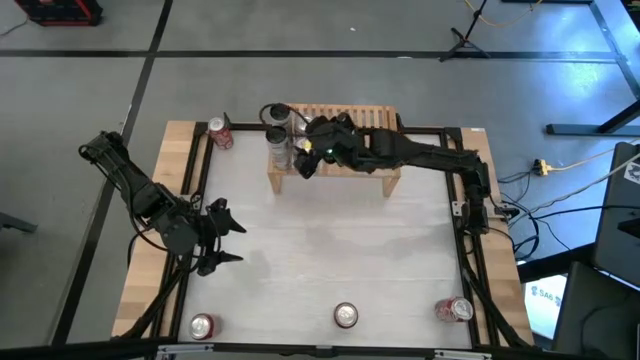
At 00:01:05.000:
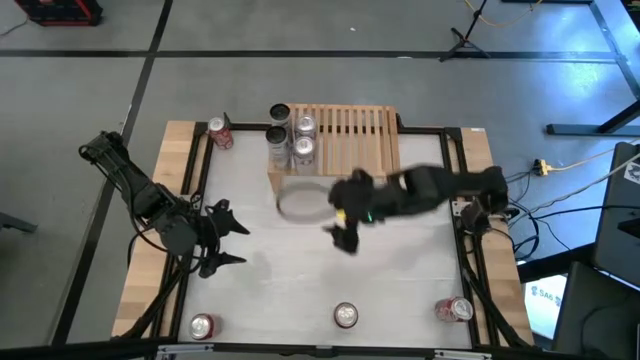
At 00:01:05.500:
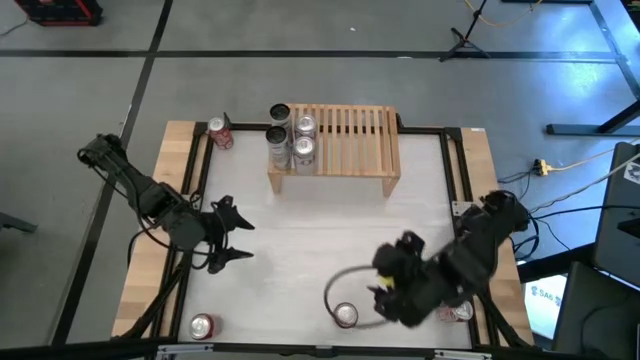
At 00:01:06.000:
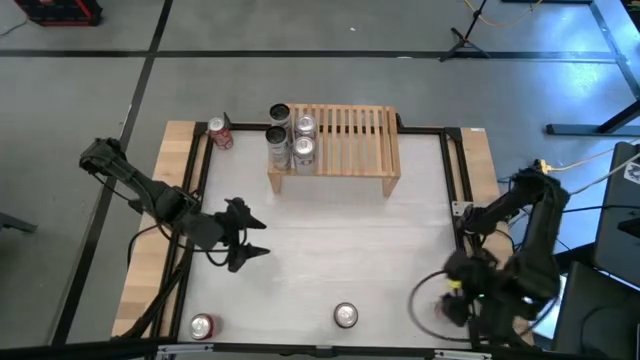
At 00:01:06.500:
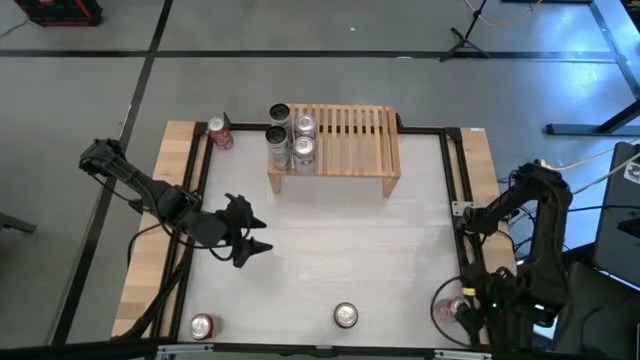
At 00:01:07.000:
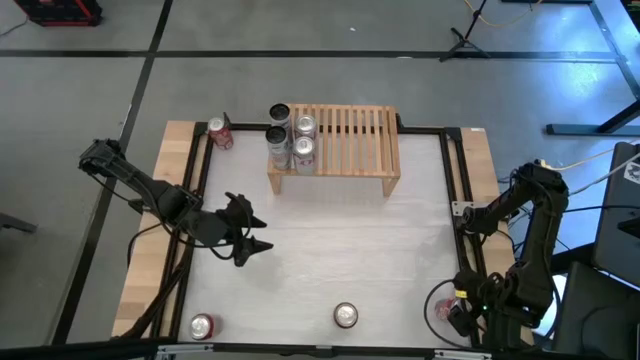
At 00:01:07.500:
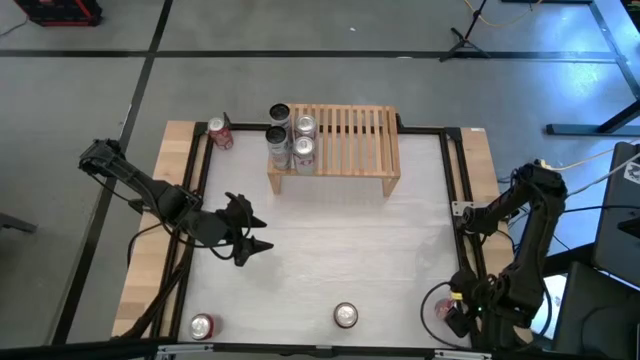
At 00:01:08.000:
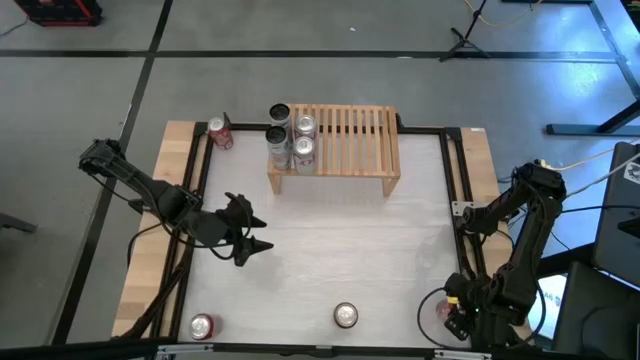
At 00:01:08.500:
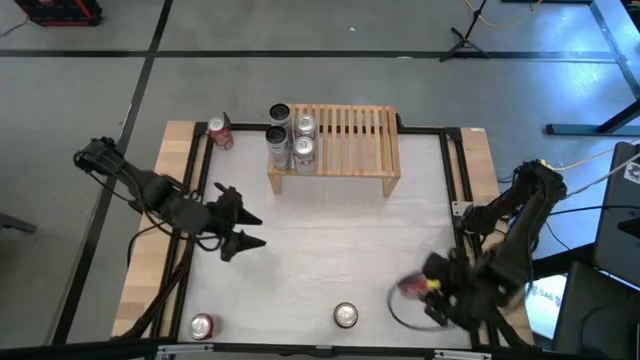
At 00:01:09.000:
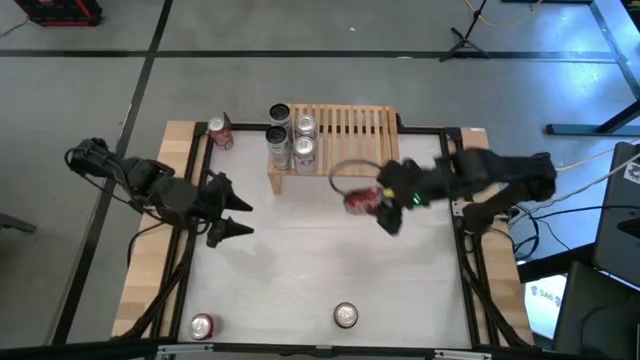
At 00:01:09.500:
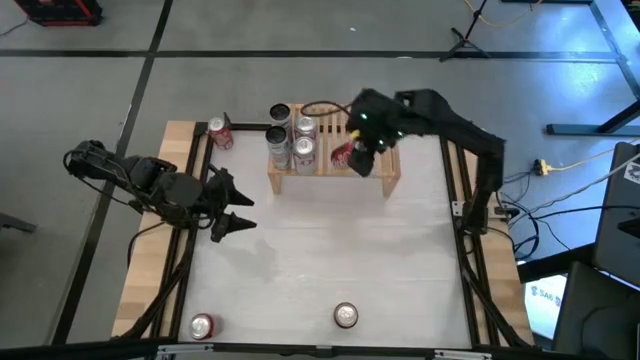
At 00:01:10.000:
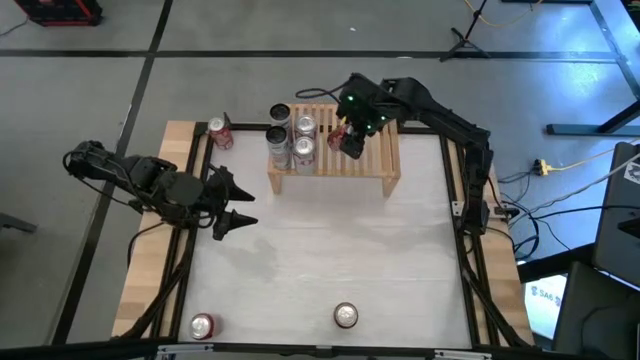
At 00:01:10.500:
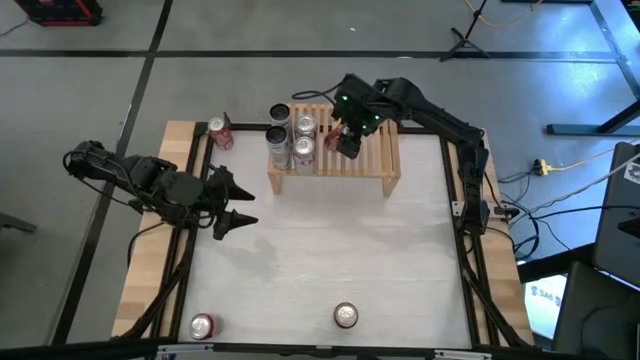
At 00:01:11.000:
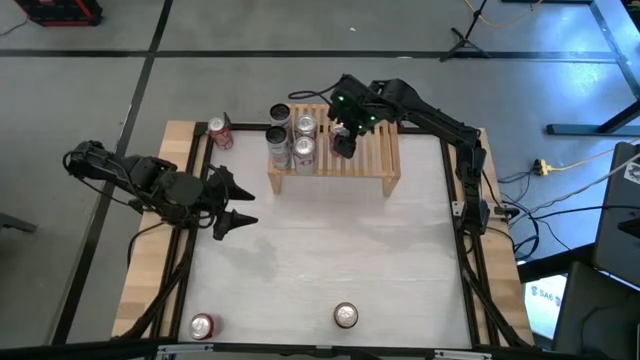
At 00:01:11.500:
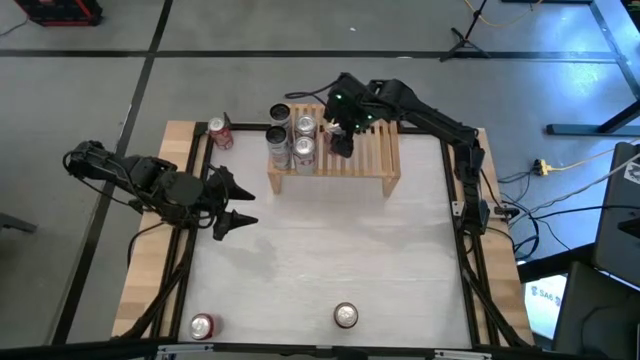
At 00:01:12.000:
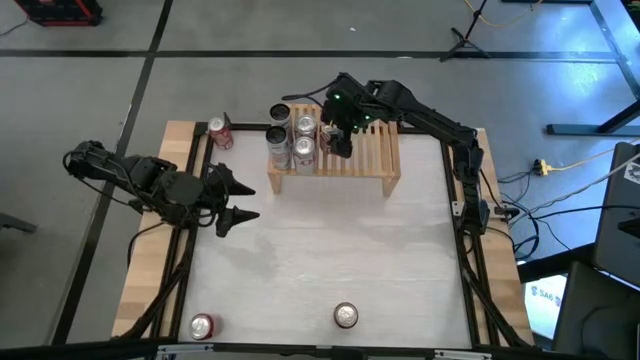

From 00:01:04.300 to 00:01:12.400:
Task: Place canned beverage on shelf
Put the red soda can on the shelf

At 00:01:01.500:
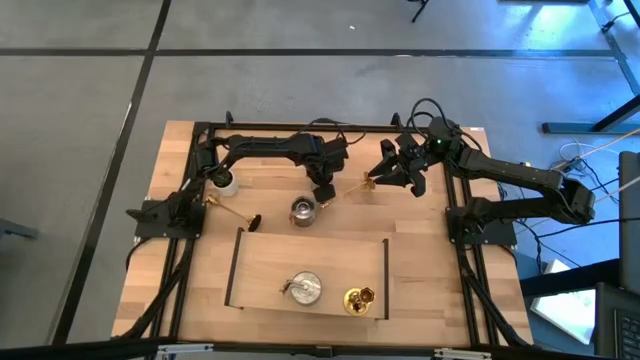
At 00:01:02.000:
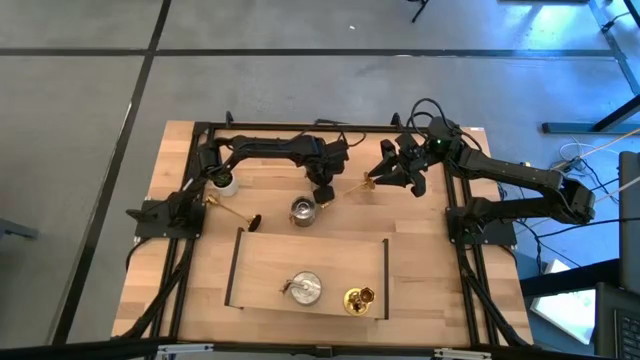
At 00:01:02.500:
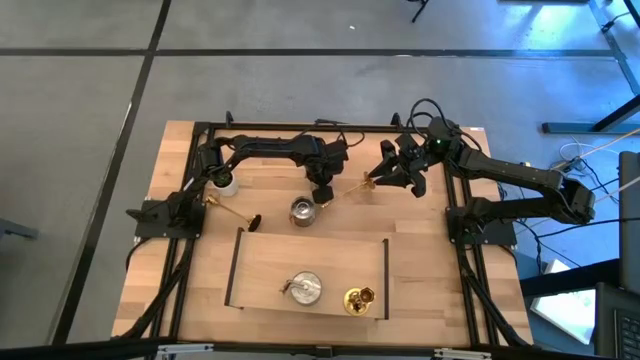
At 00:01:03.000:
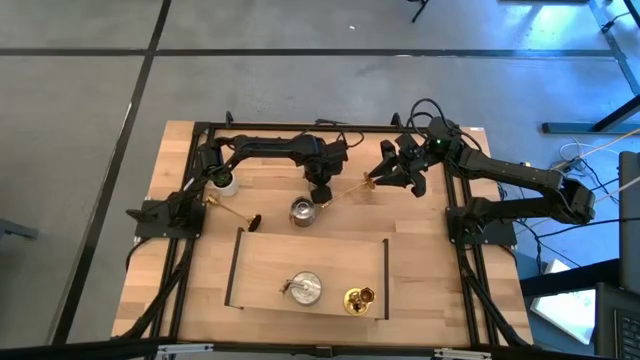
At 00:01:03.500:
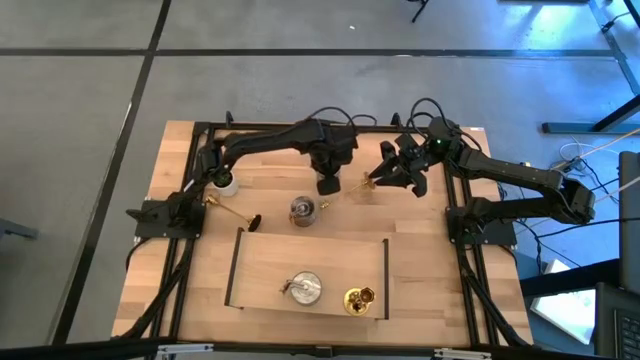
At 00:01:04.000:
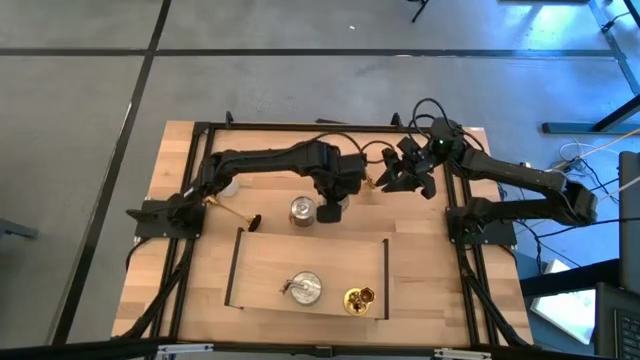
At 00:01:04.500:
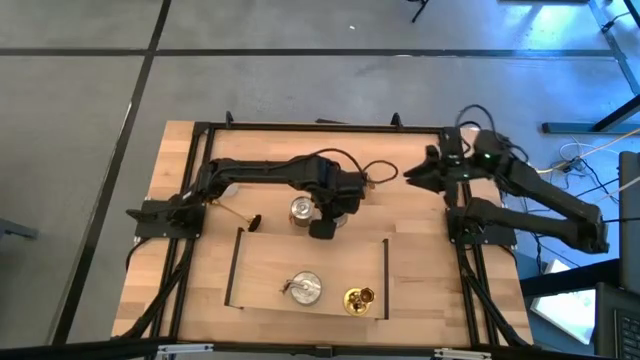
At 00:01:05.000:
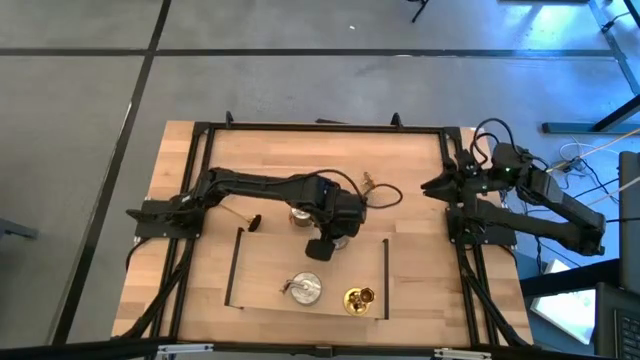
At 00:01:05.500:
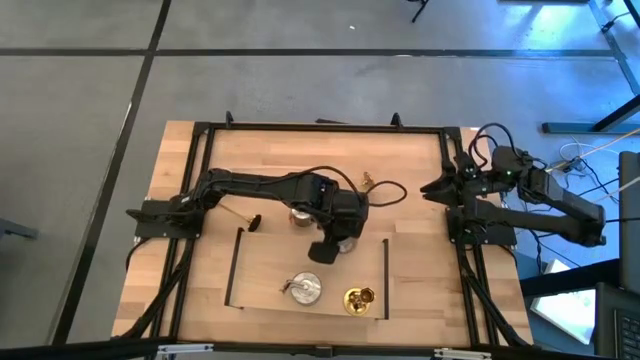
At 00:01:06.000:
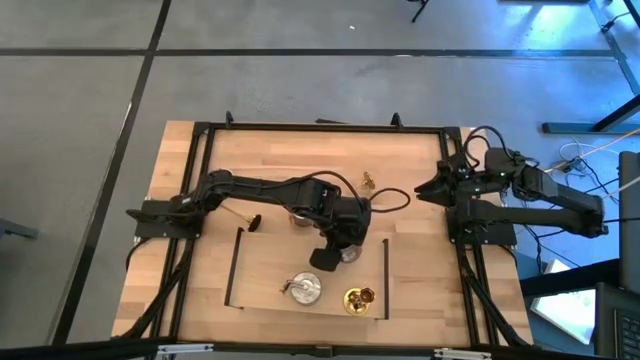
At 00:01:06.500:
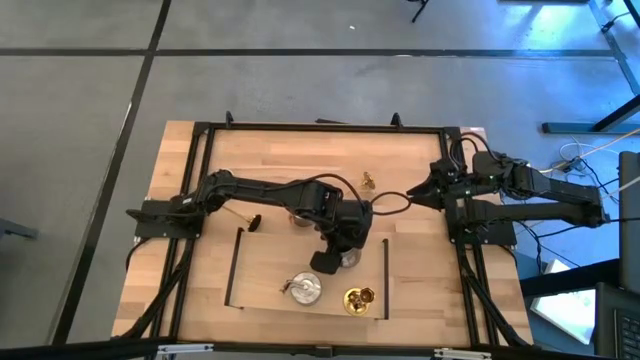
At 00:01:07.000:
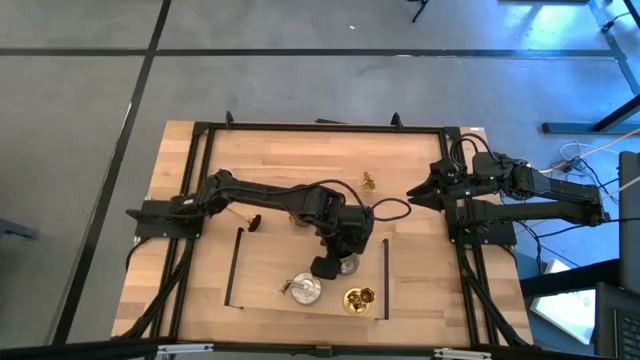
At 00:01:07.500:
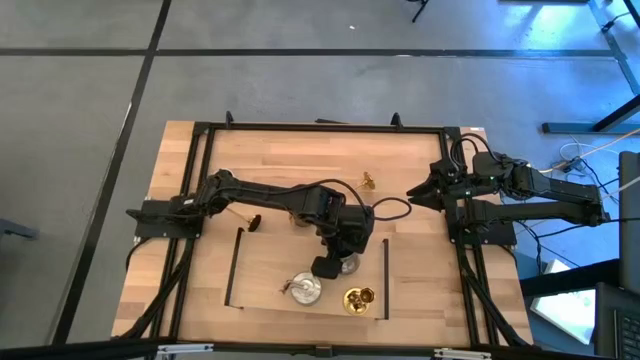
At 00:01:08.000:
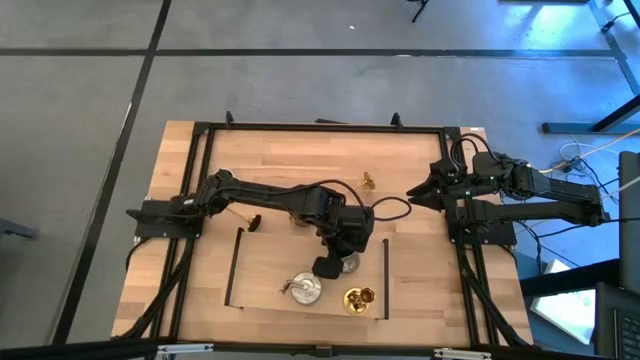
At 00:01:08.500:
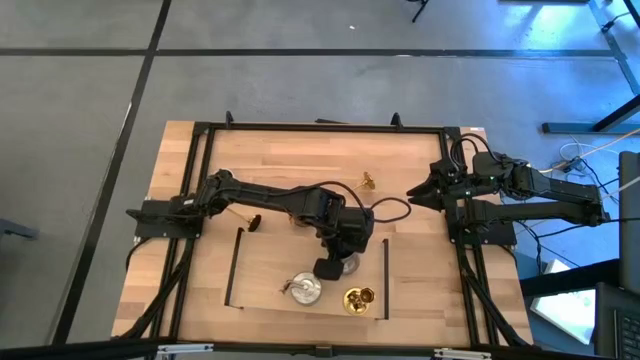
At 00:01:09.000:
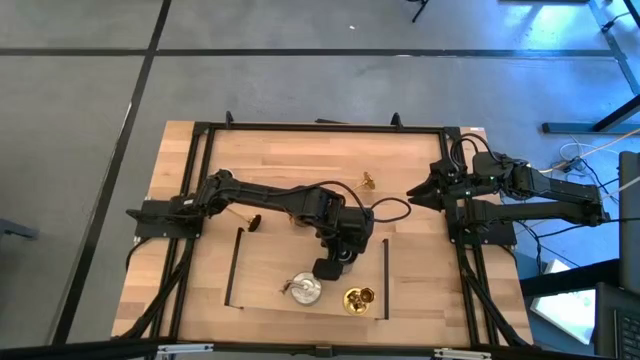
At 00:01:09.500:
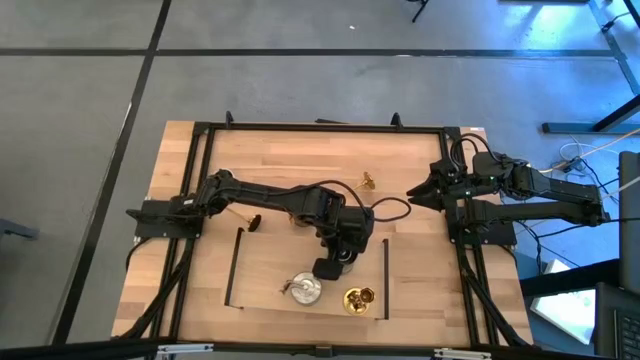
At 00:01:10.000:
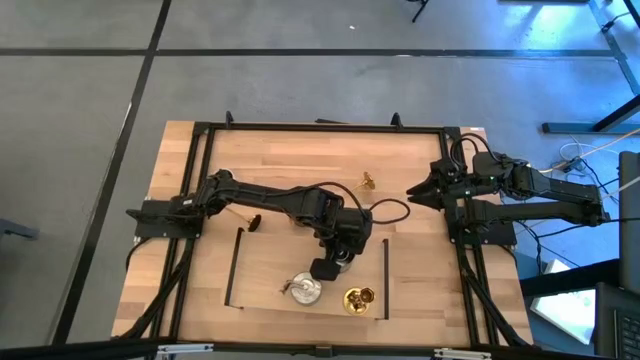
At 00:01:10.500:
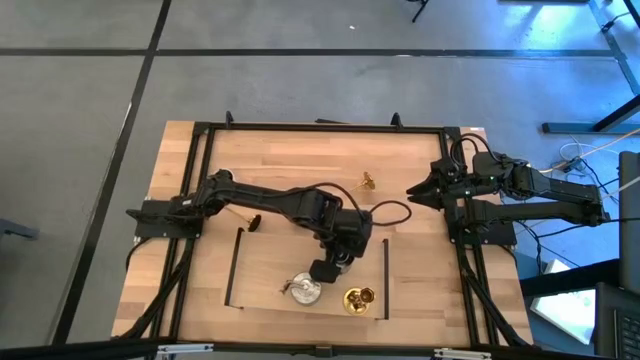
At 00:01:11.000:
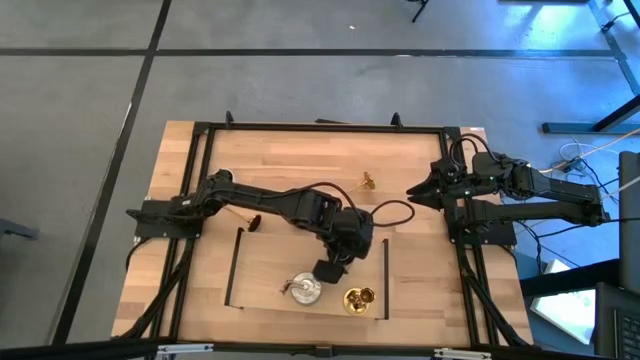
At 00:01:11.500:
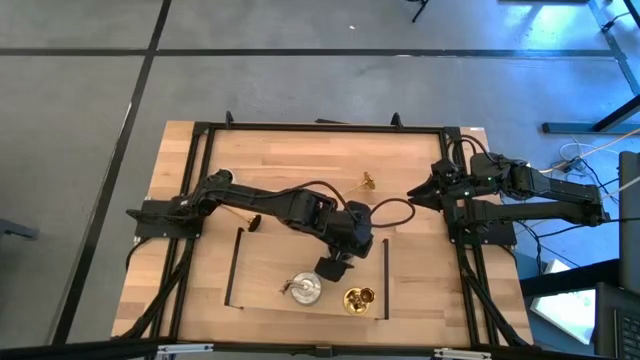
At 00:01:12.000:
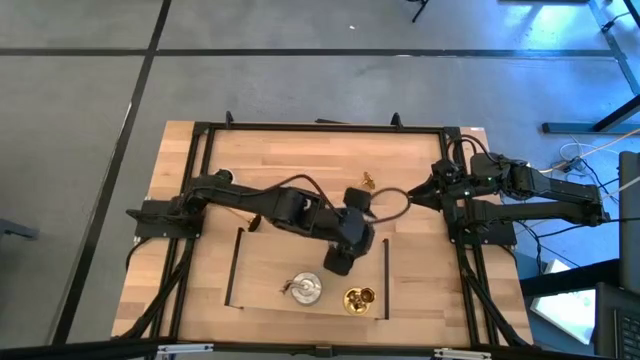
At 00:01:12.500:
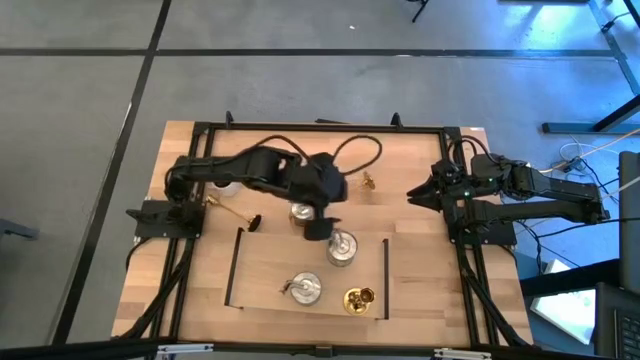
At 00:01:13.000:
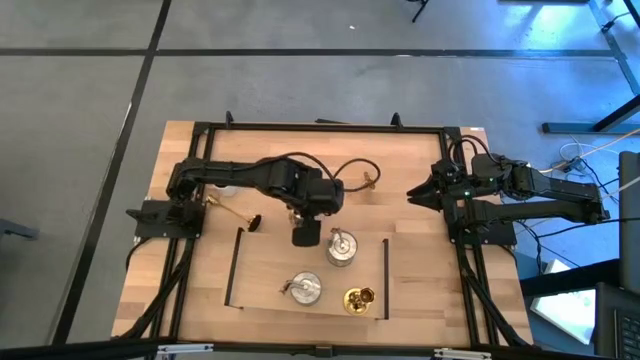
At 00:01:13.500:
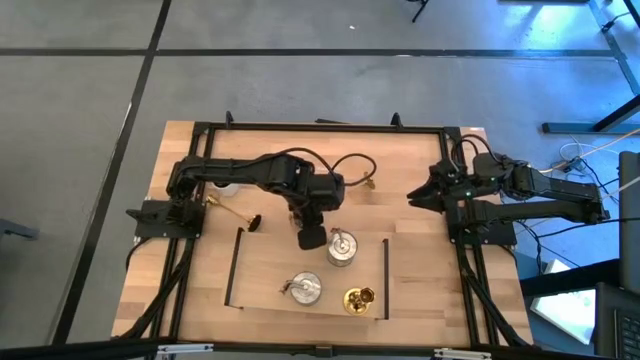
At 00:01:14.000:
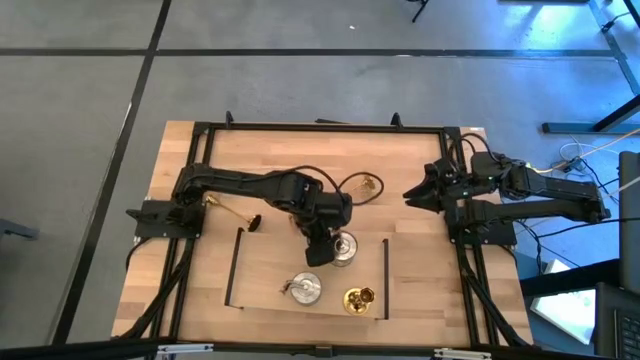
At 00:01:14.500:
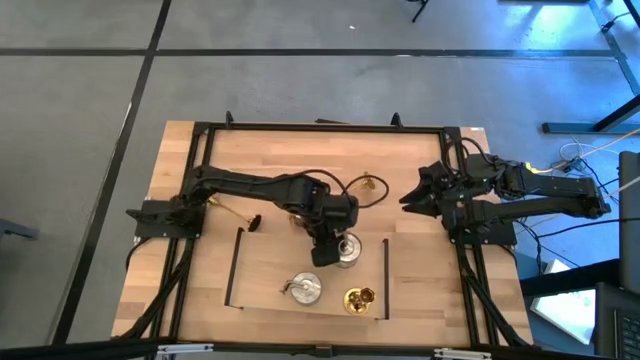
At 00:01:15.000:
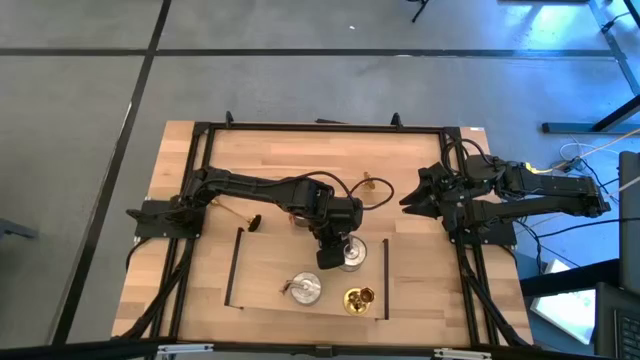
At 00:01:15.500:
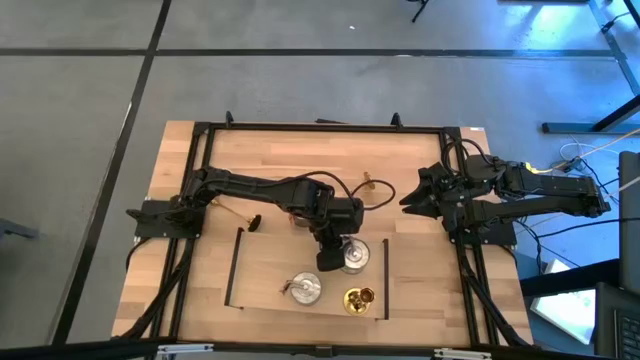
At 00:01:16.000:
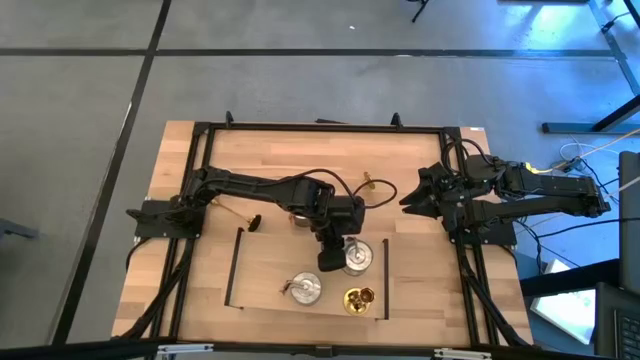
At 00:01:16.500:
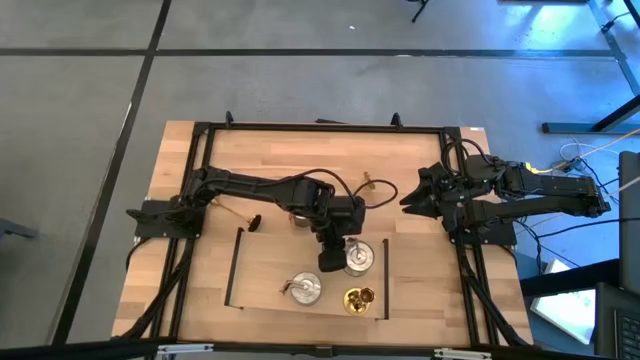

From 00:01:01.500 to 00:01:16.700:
Task: Pick & Place candle stick holders
Put the top silver scented candle on the shelf
